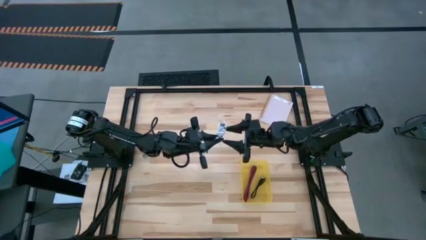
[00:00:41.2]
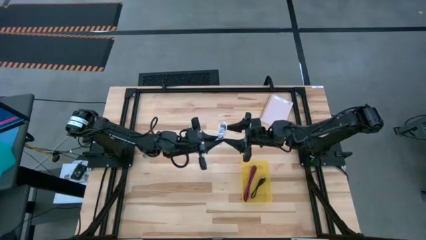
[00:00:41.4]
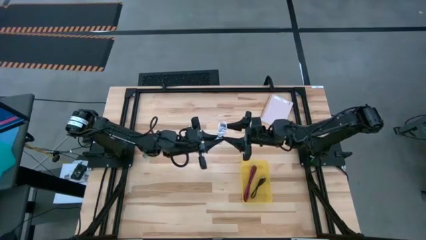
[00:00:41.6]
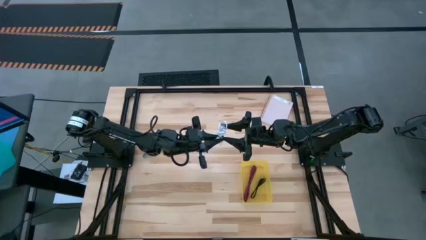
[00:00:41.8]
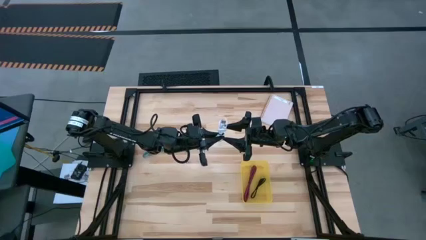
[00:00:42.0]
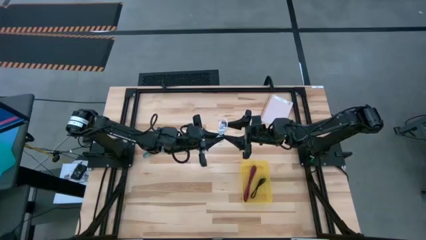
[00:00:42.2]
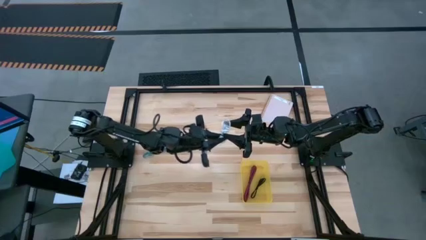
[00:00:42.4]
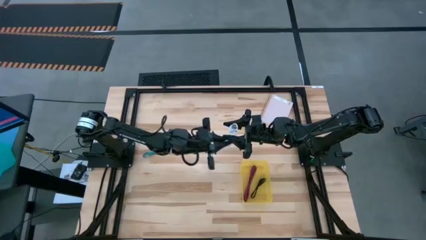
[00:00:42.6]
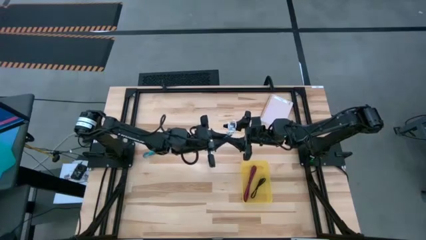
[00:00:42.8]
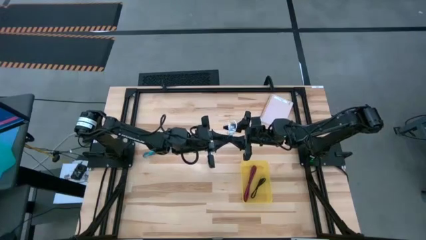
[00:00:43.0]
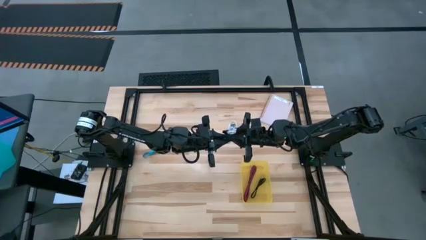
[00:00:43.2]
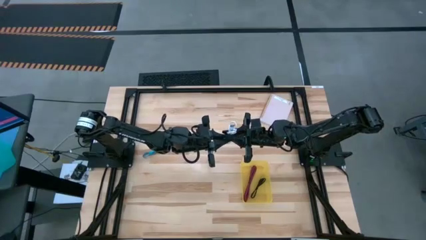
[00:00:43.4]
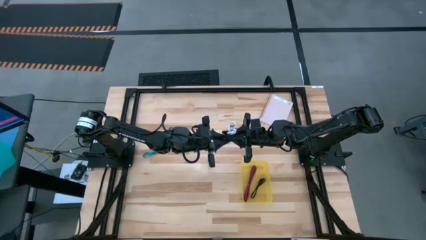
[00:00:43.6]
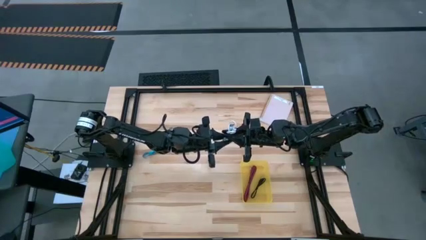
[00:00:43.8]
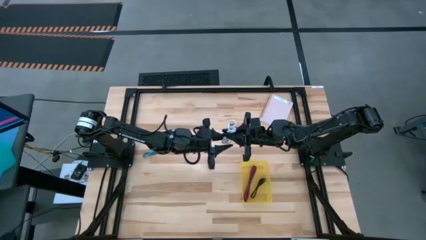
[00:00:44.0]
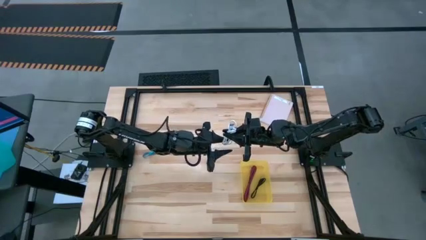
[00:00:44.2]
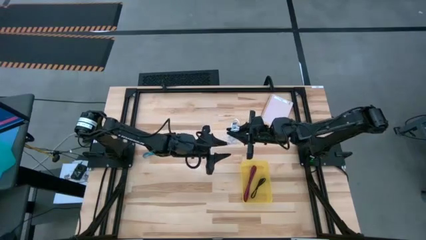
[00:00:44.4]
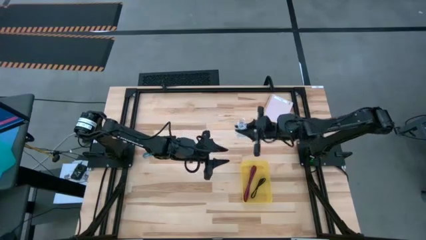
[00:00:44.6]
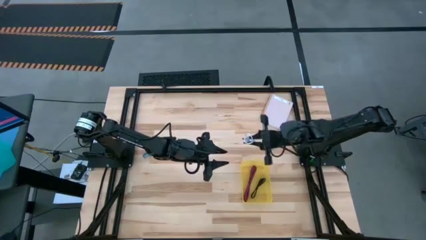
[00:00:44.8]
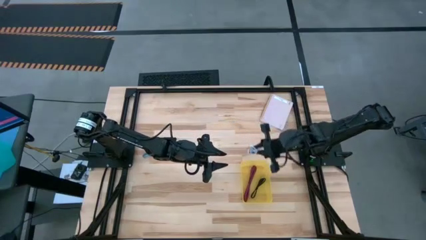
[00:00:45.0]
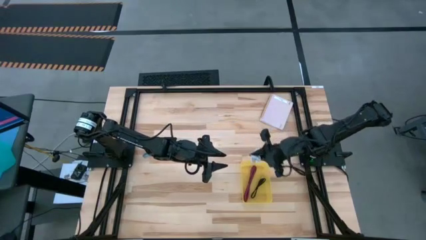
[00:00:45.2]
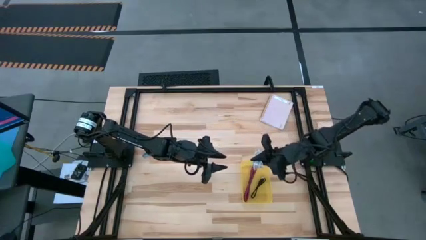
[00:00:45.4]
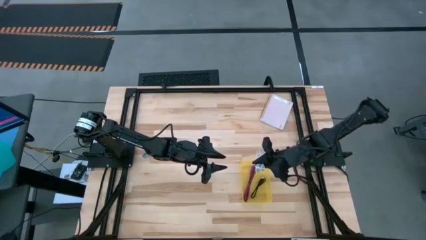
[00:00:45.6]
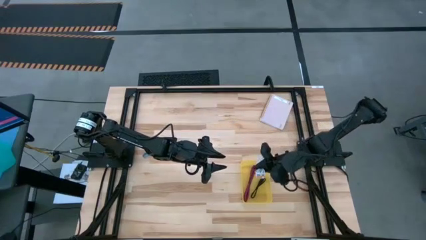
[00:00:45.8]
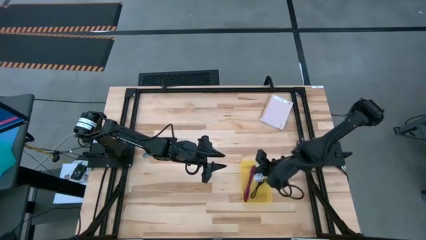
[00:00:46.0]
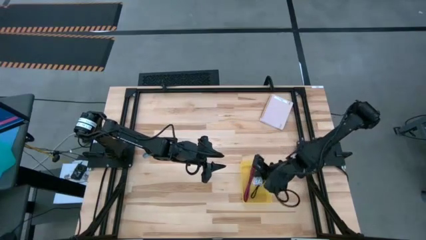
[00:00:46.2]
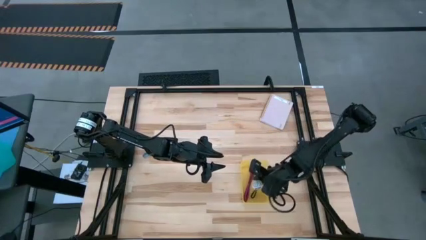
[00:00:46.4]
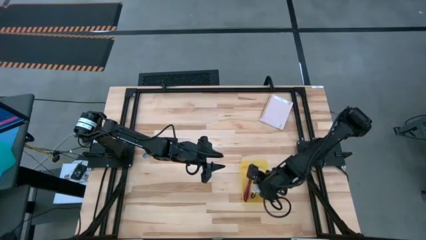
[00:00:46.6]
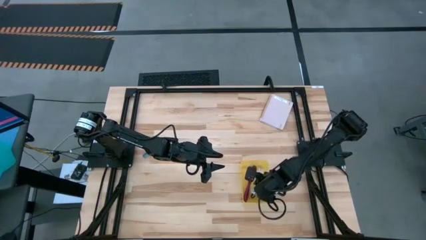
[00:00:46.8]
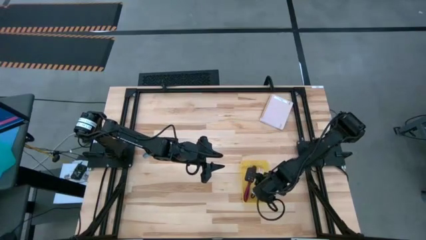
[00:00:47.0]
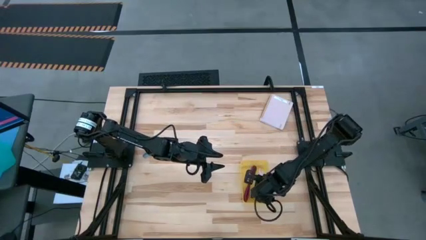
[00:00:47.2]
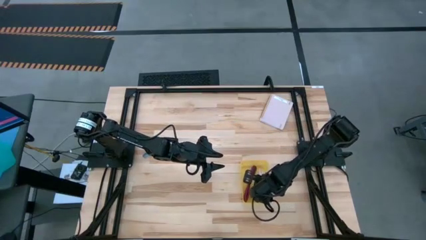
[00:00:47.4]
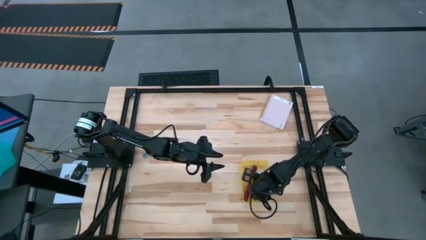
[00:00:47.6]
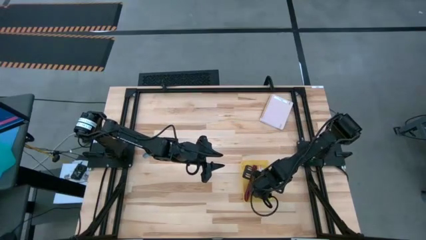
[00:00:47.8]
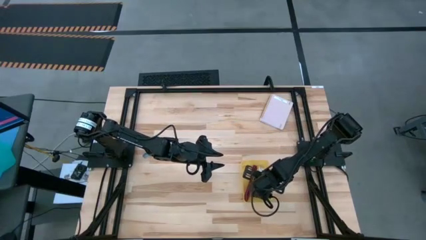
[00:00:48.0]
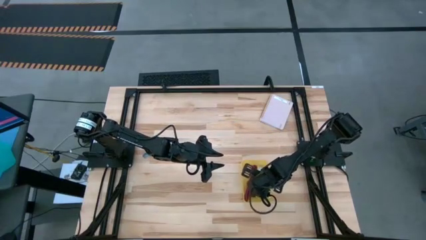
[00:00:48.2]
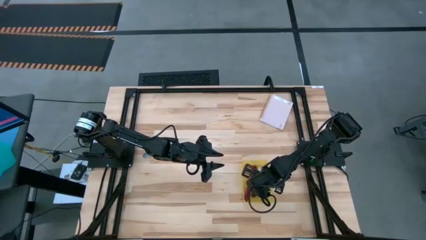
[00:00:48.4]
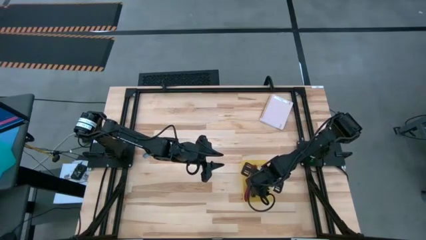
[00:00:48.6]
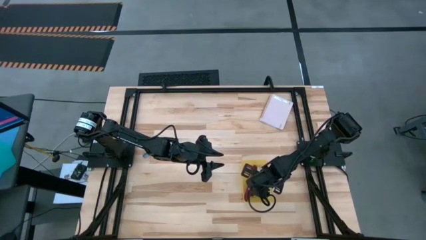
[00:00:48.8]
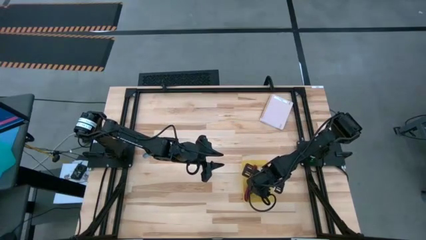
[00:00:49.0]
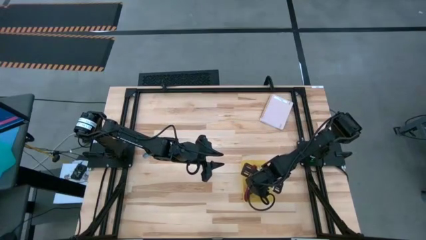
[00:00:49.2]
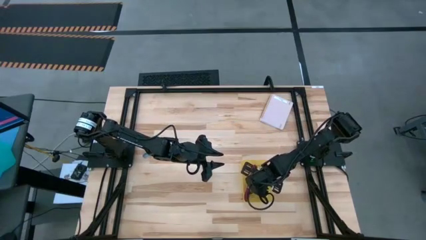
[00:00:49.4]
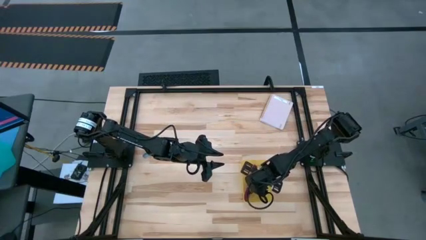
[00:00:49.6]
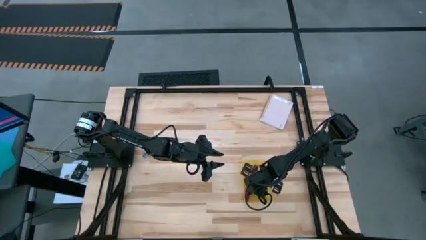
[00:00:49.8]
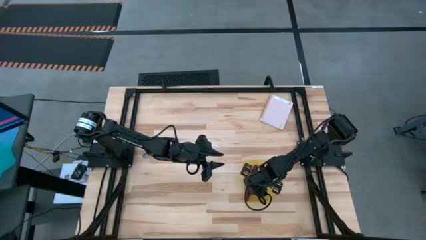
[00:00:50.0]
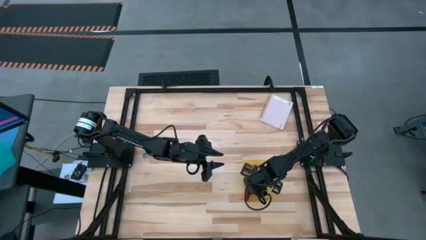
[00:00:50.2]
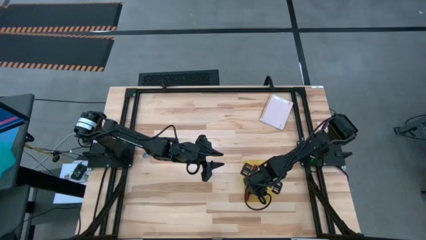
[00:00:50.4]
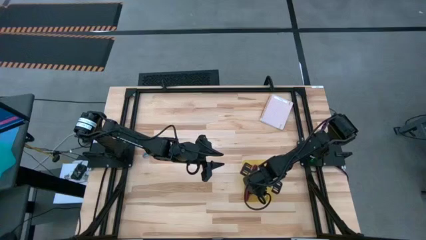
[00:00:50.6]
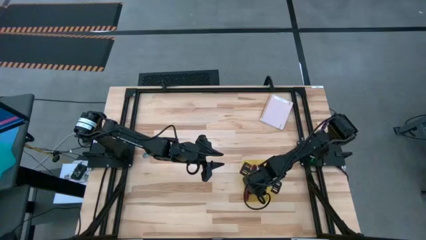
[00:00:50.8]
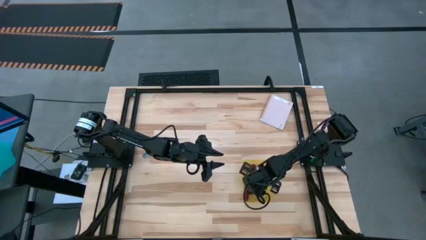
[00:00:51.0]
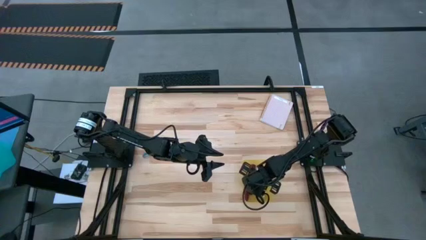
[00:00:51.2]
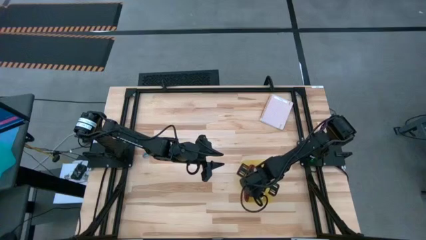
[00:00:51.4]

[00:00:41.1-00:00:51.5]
Task: Pick and place USB-C Cables
Put the white charger cable into the yellow bin

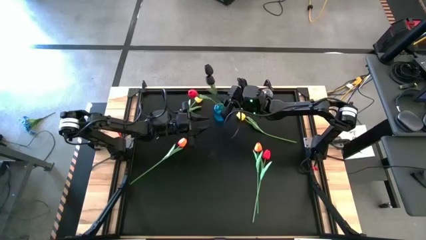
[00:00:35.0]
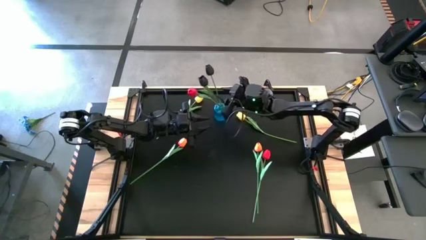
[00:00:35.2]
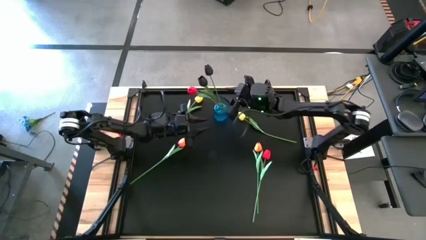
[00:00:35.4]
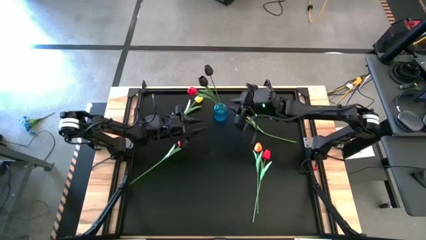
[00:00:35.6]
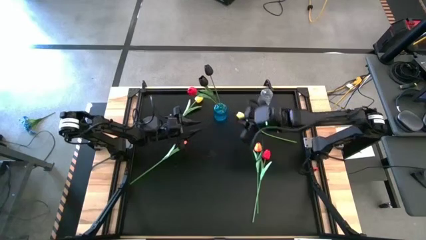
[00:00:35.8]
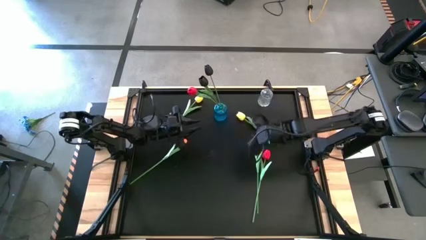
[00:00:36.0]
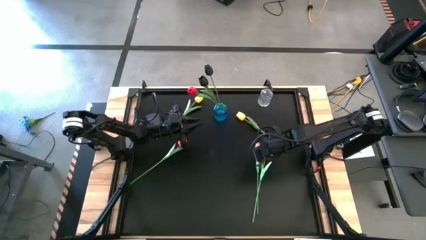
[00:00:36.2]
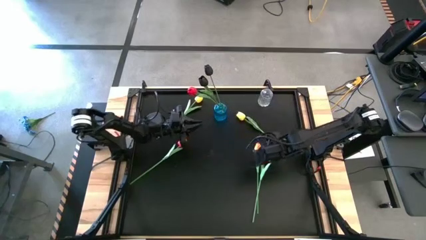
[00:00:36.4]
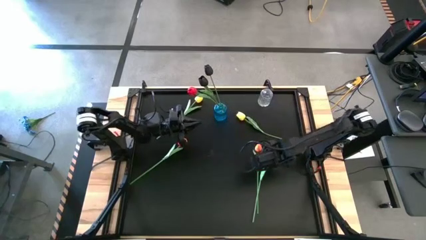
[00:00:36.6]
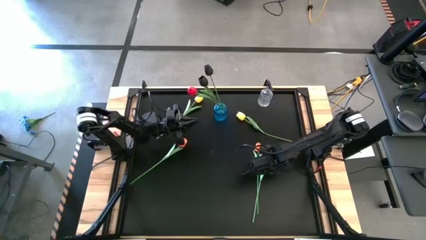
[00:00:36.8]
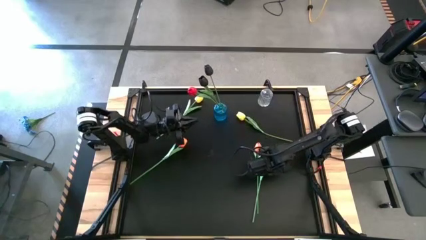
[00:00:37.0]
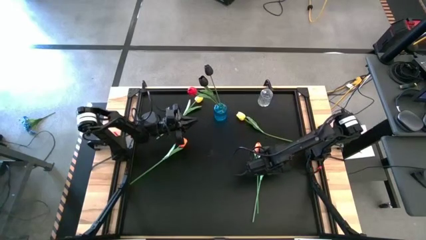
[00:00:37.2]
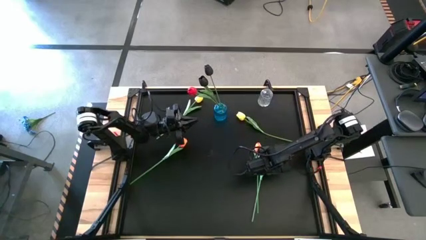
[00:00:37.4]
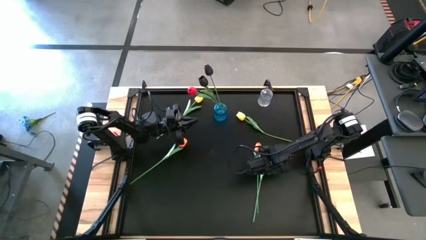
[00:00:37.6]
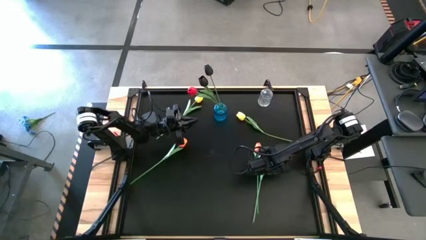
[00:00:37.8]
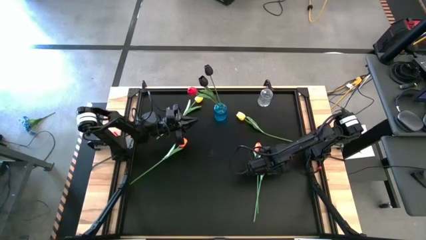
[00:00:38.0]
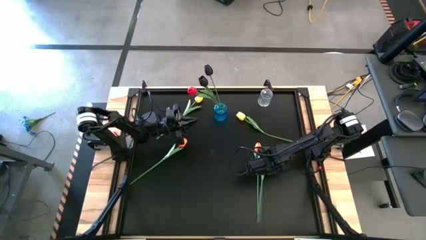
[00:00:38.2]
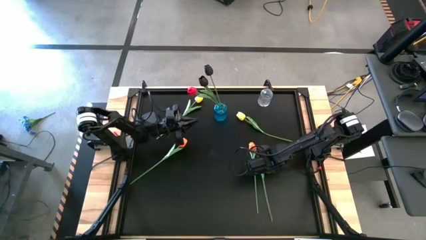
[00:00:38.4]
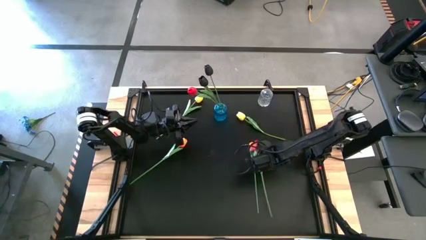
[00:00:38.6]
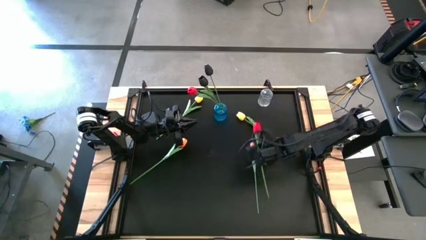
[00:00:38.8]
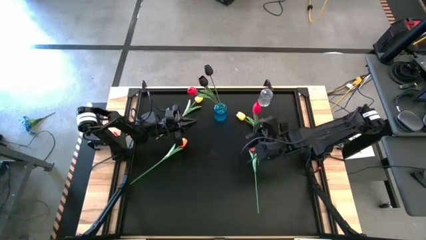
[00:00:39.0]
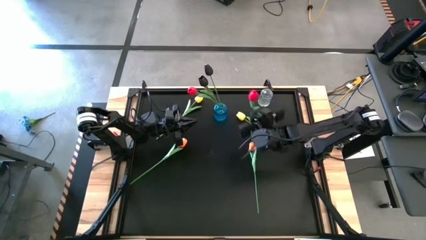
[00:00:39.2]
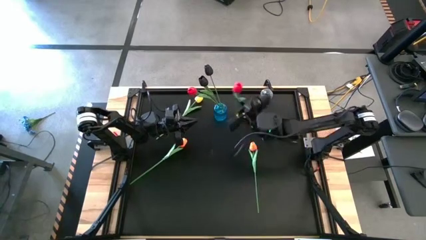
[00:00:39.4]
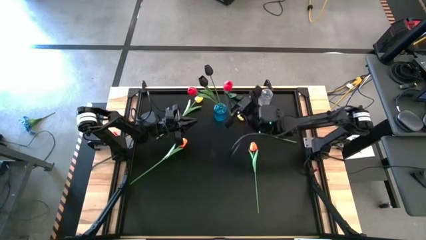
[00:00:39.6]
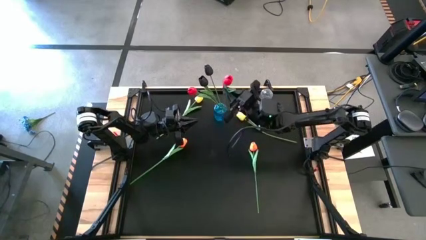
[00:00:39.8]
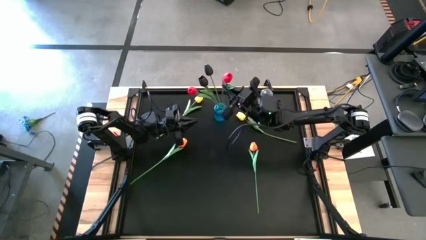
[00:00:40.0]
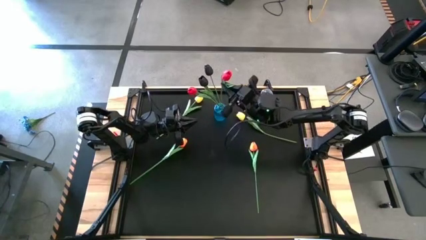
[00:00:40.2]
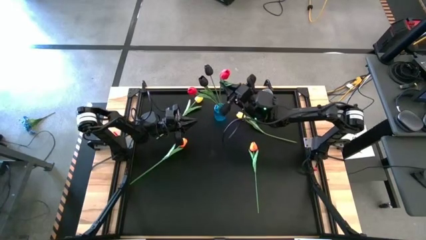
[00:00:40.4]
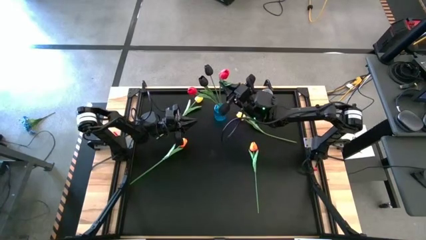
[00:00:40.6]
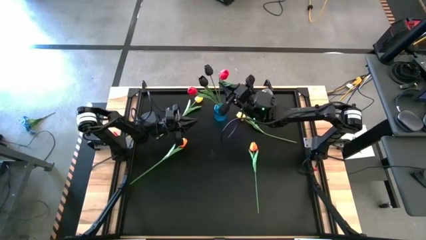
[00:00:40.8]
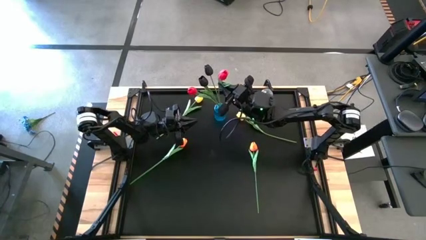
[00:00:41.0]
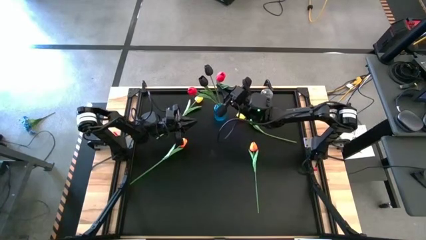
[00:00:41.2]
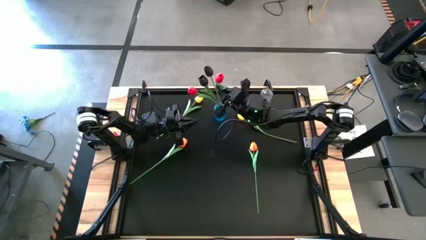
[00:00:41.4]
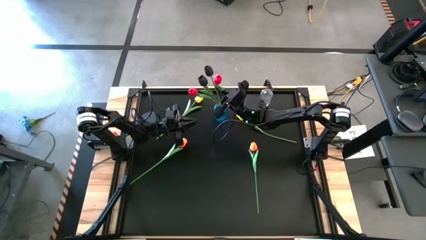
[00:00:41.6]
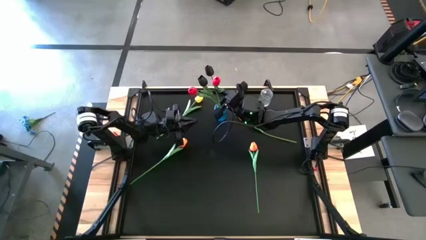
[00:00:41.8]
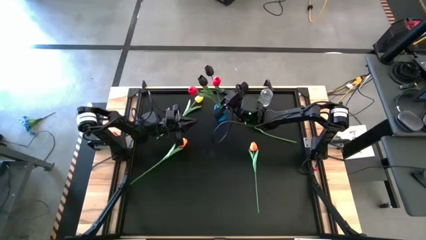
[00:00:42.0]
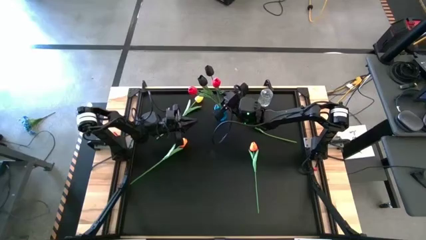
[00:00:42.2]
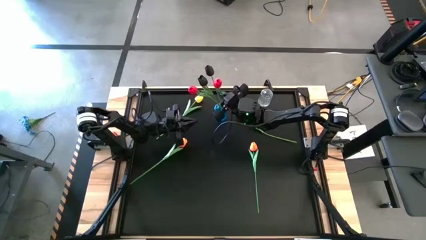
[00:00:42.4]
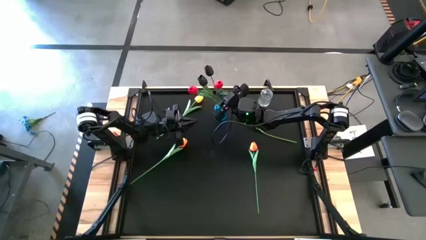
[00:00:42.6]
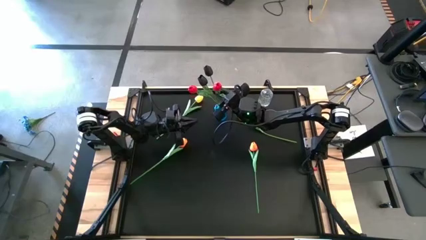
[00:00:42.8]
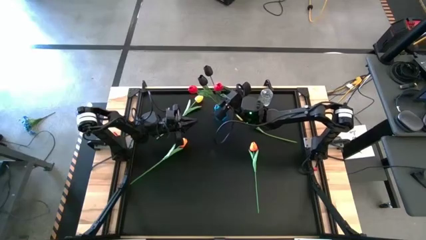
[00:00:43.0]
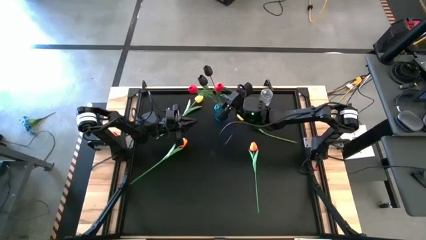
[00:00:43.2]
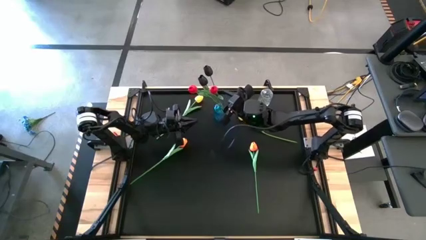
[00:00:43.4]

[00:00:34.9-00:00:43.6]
Task: Sort flowers into vase by color
Put the red flower into the transparent blue vase
